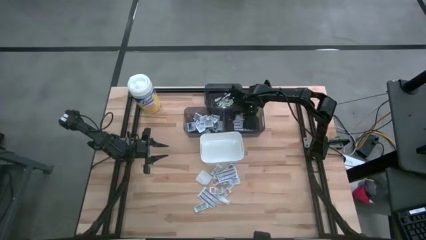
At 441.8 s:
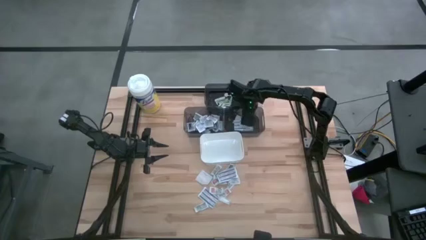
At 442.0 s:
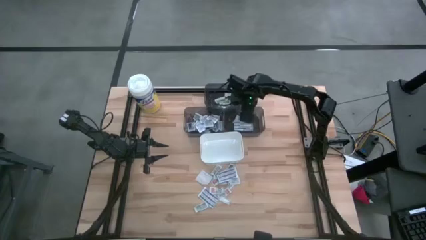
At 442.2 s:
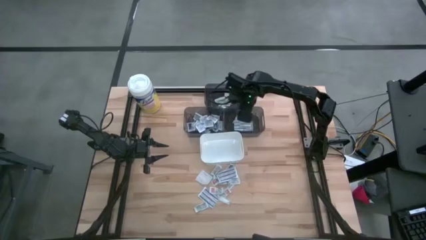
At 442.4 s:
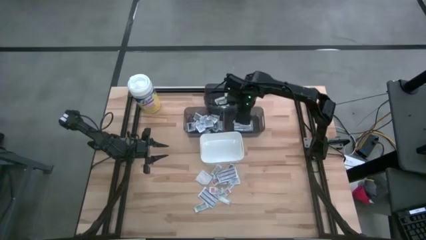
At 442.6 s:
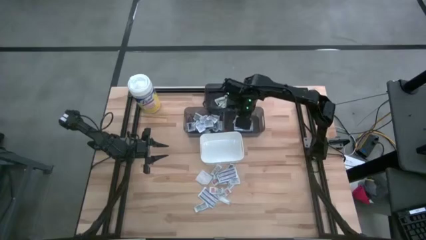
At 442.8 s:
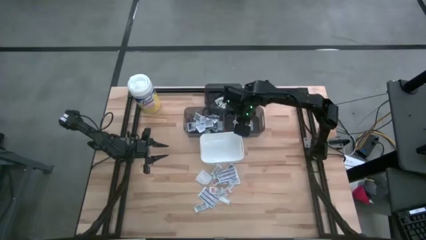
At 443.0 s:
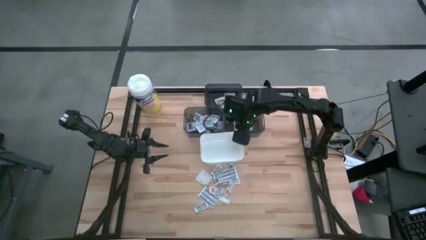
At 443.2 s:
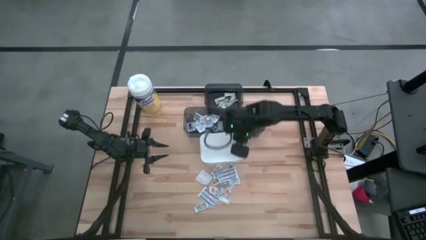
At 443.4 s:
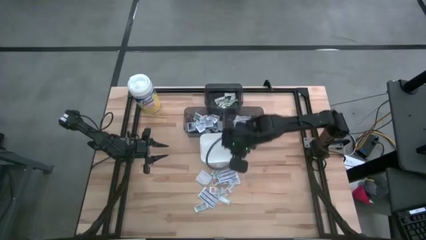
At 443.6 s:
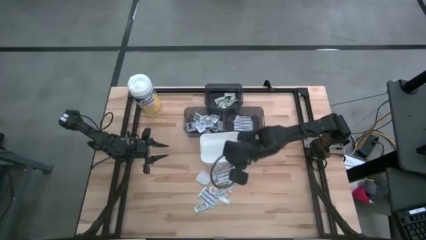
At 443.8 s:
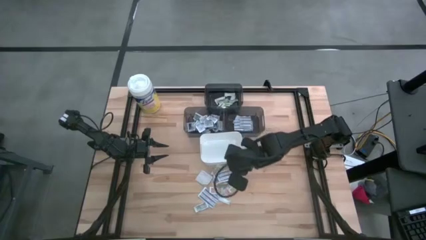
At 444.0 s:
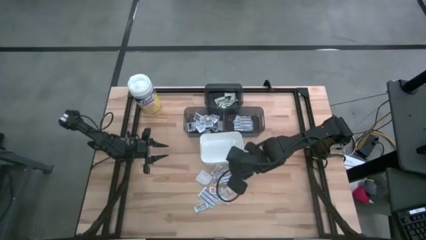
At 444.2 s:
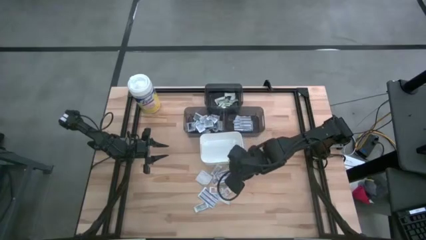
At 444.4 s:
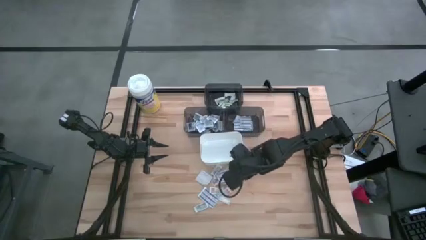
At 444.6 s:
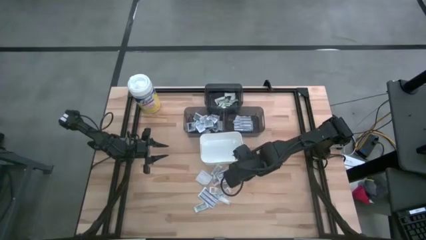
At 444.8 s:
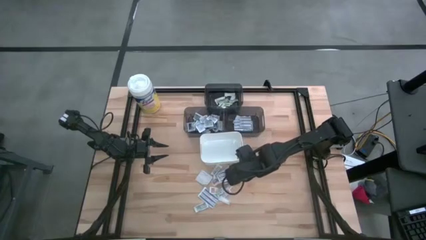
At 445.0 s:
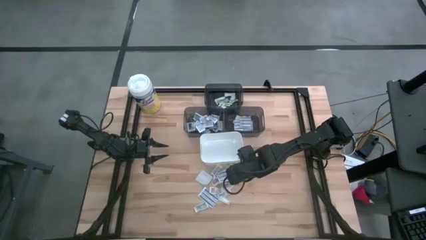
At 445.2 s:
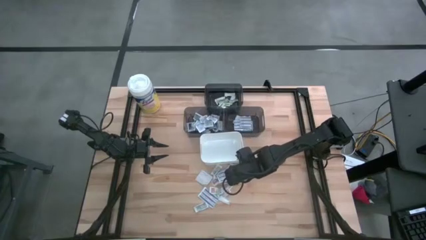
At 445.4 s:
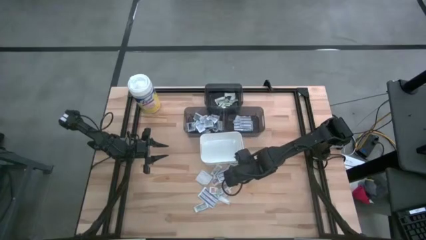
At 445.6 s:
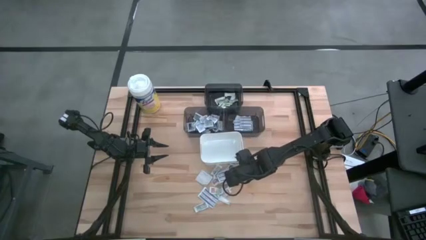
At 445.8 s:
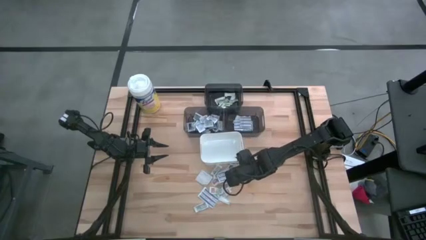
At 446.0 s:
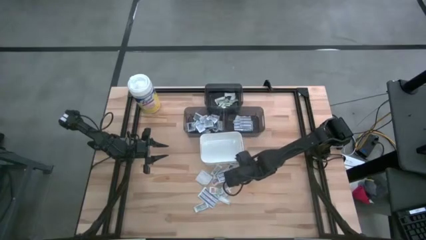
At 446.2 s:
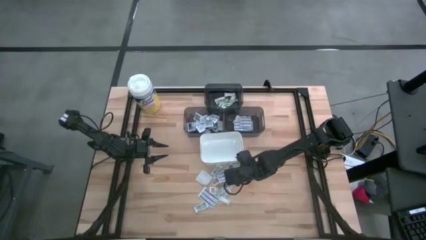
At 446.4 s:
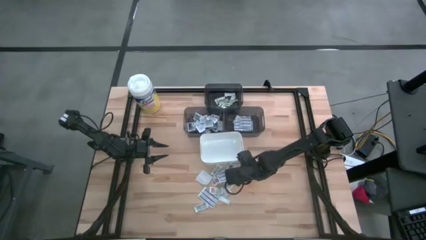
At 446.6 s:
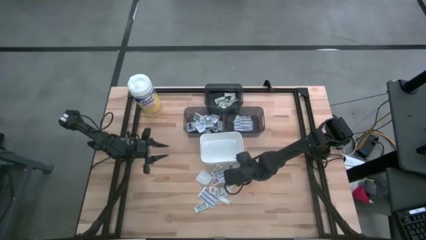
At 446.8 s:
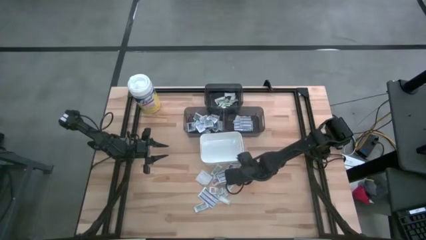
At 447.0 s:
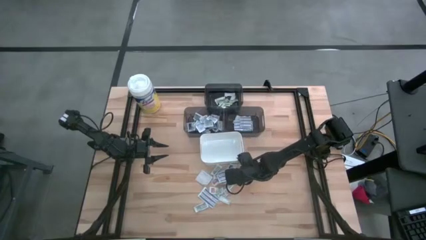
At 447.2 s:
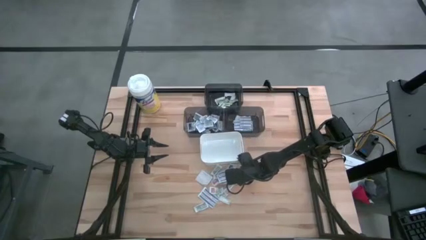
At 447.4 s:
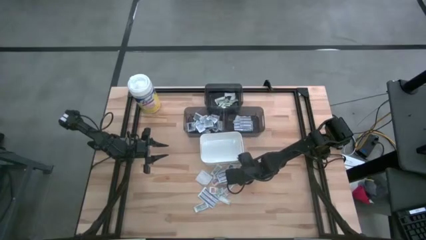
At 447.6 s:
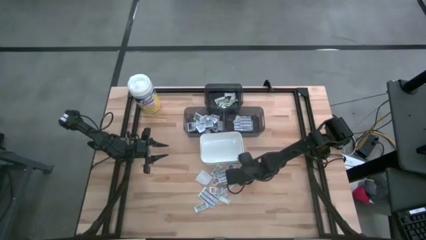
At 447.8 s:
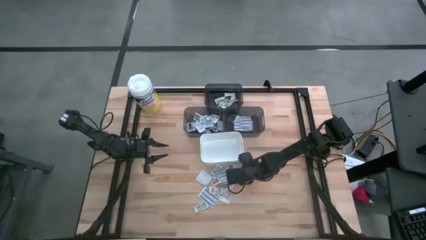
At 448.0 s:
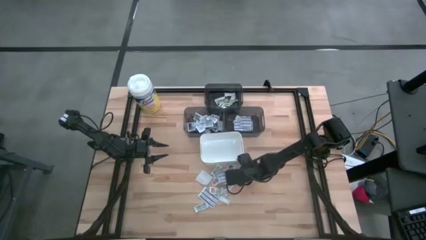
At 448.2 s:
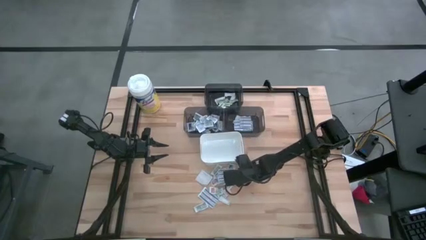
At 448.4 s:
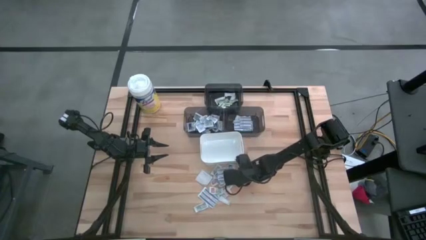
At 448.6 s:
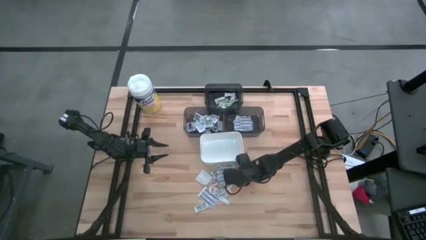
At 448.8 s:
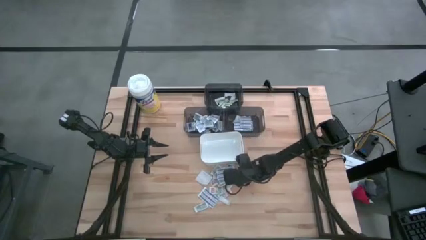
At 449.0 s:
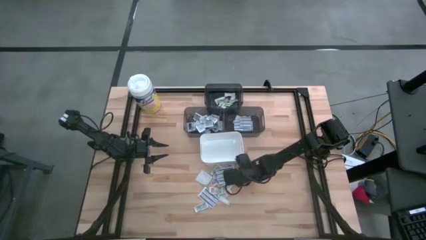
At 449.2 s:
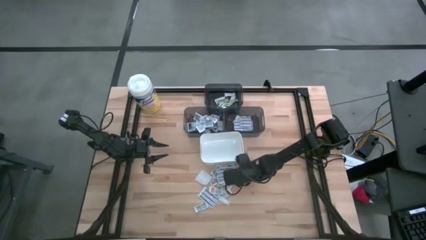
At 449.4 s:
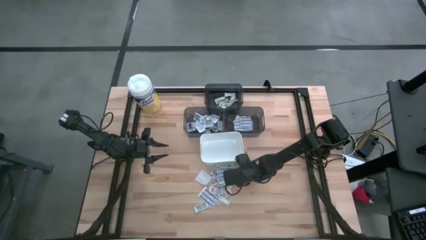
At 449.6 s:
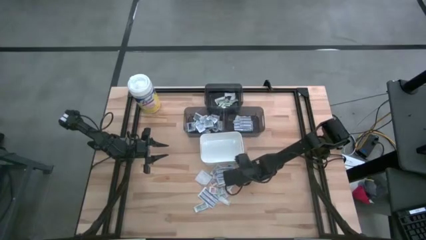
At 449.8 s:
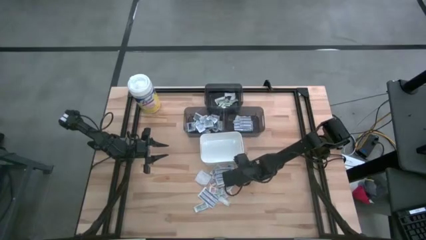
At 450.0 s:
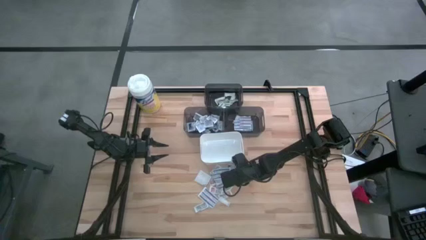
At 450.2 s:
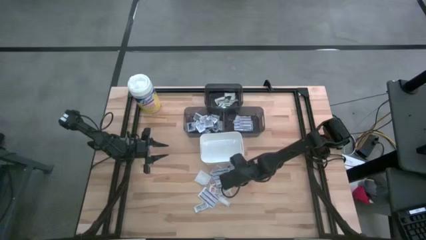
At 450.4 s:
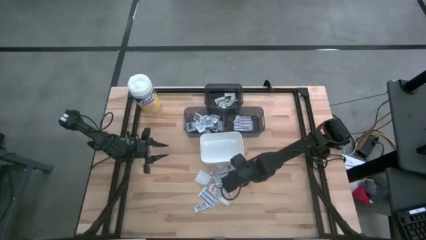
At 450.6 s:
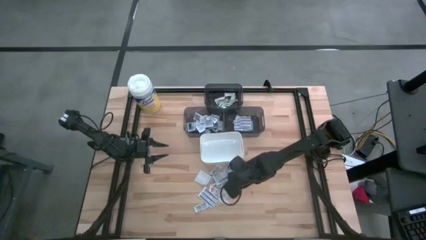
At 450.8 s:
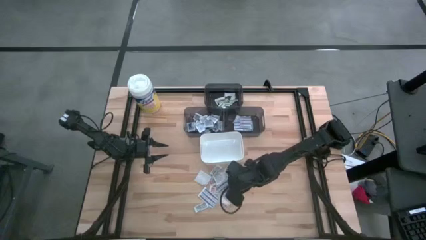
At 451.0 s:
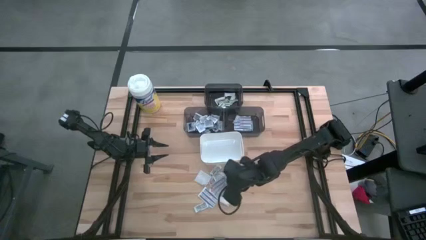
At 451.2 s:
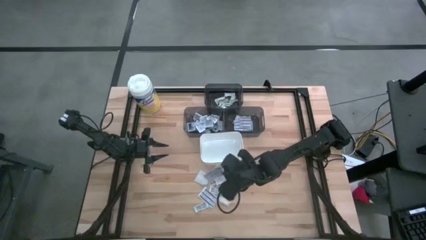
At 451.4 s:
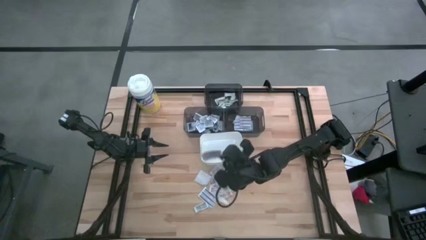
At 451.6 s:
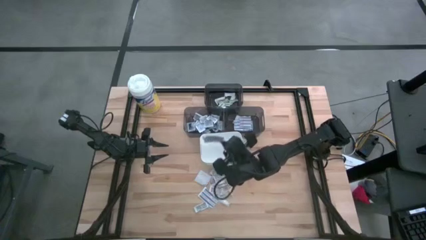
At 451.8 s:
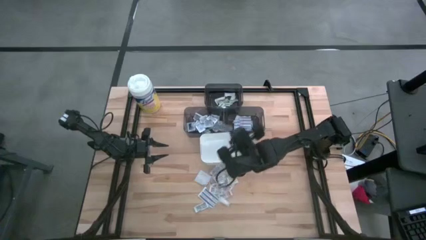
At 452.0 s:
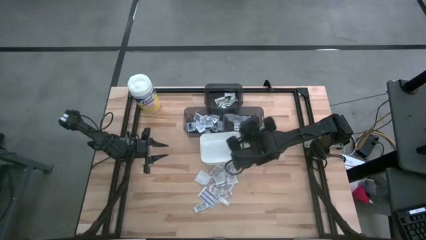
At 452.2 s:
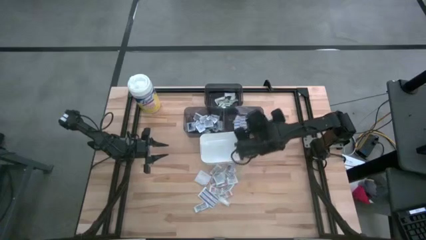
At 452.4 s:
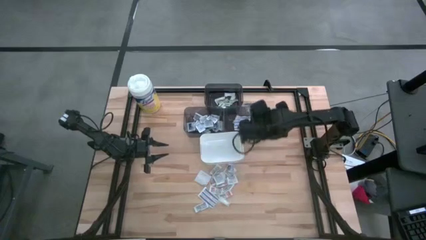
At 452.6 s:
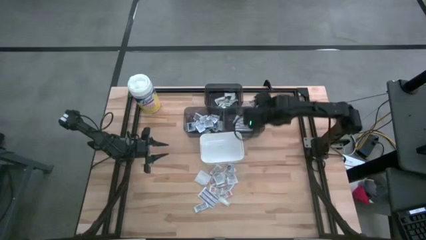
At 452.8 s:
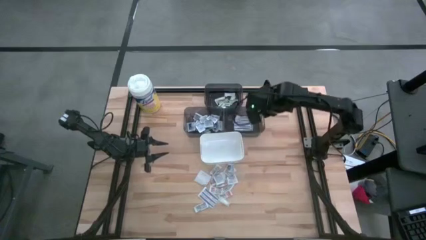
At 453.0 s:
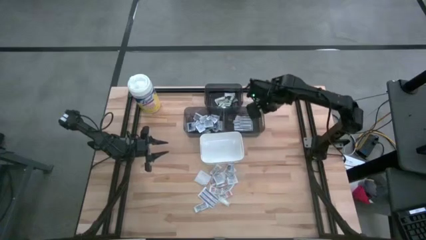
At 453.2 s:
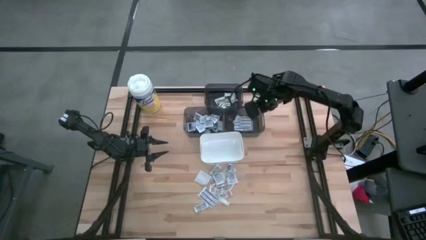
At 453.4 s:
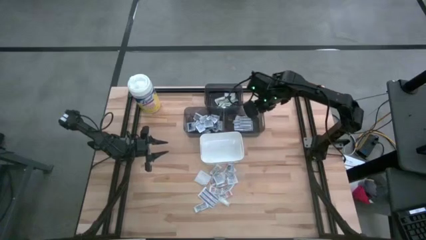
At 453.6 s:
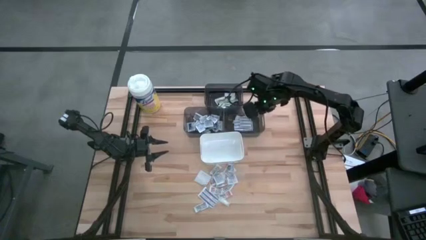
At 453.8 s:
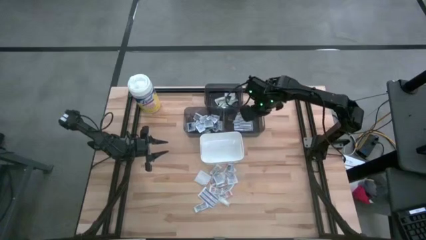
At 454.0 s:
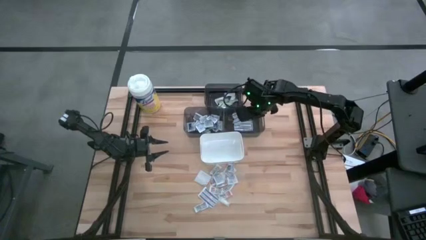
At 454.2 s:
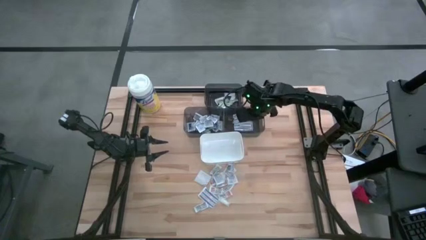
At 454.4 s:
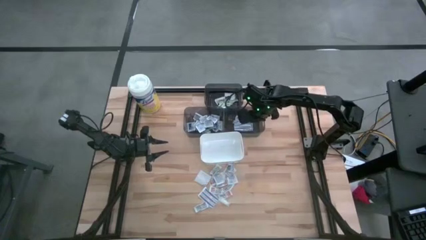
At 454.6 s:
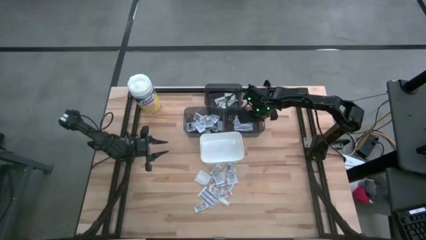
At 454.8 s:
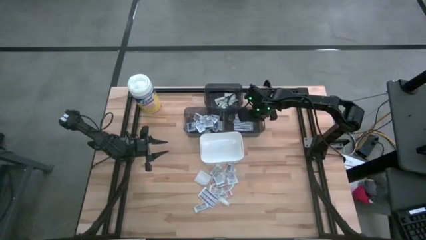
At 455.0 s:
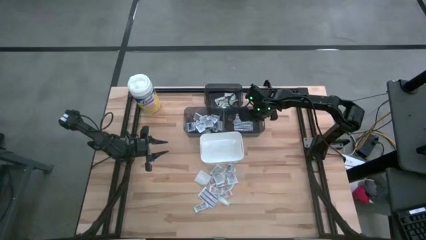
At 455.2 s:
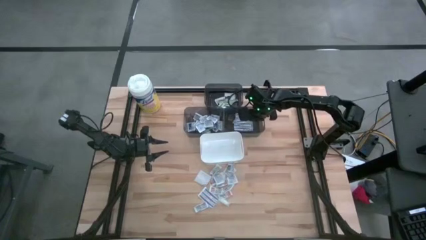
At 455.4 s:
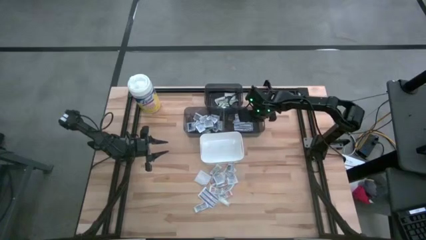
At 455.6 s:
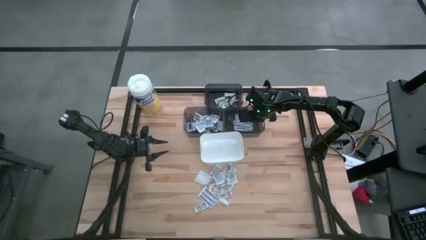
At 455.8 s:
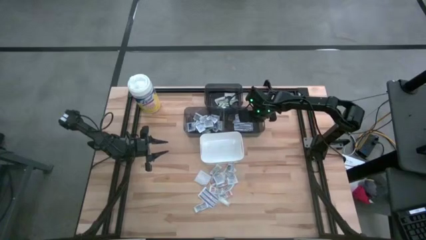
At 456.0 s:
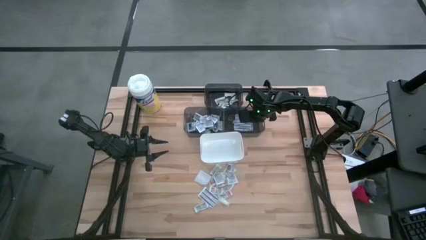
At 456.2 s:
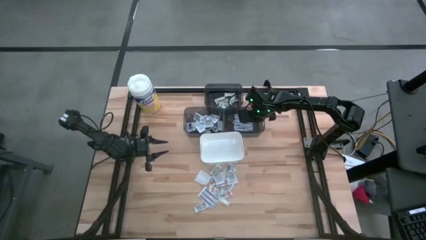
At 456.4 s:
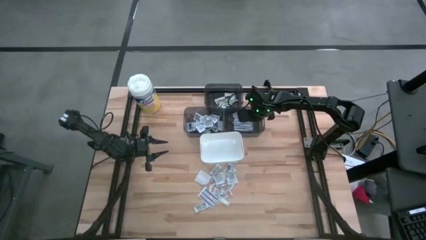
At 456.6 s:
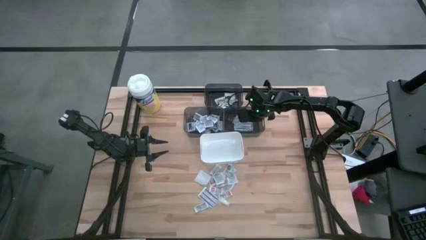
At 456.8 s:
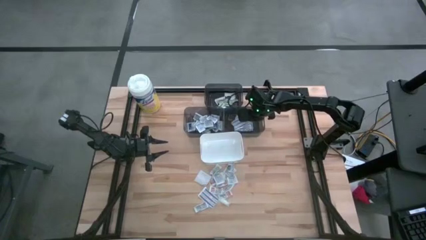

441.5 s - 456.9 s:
Task: Pick & Place First Aid Supplies
Put the blue bandage into the right black bin

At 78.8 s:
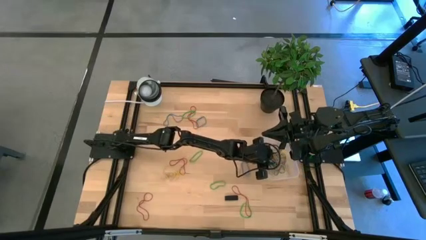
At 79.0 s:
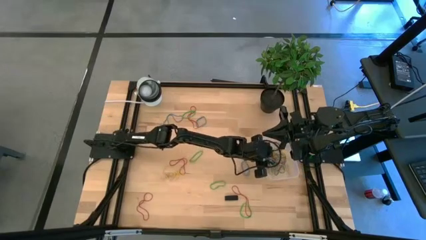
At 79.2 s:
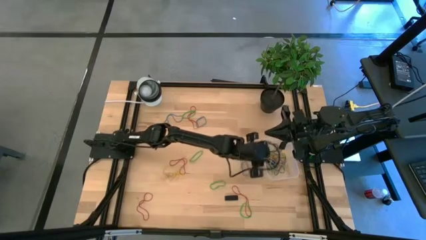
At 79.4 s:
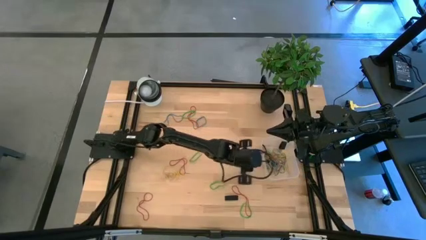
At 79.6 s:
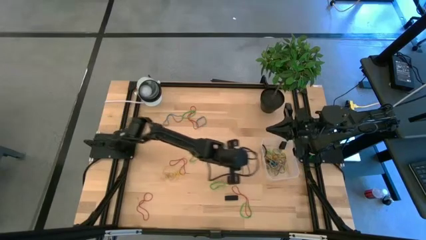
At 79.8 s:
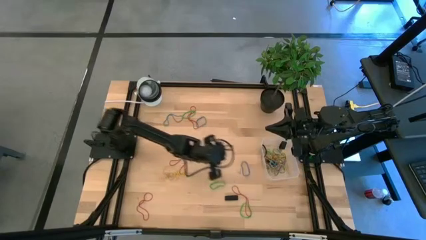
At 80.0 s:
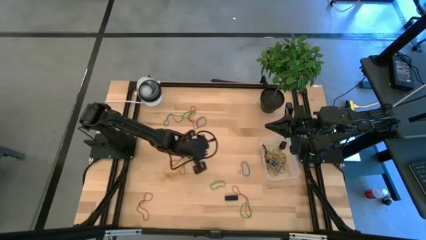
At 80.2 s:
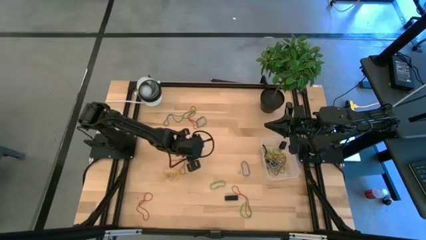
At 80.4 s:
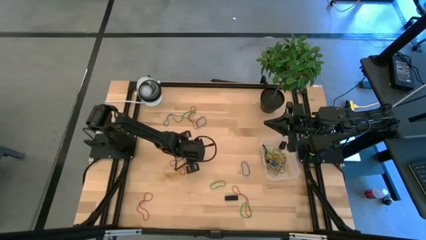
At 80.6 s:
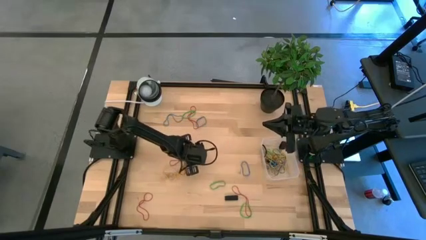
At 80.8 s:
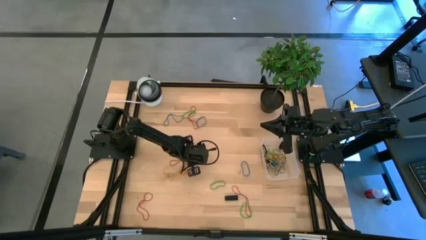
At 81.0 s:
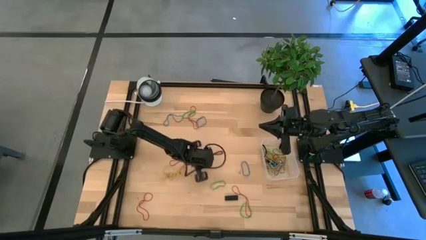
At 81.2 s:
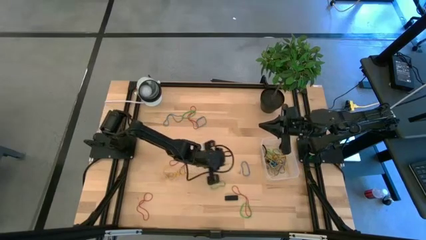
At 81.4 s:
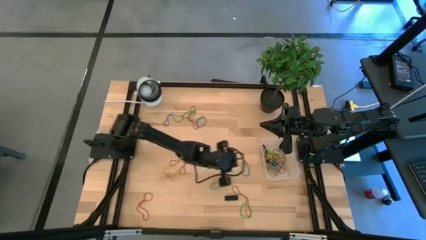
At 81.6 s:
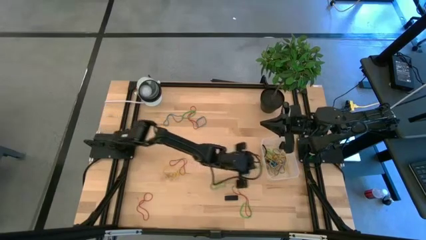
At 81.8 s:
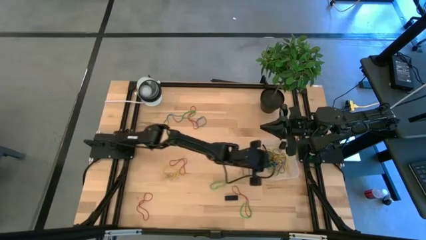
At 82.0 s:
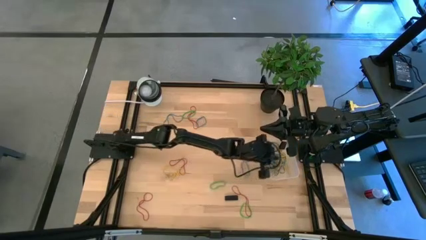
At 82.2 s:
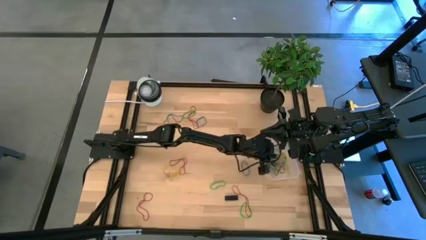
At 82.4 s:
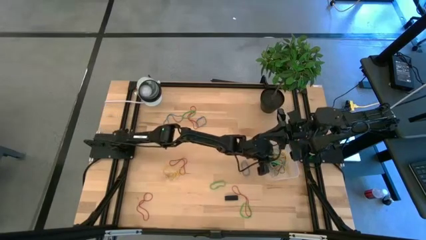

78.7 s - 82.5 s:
Task: Pick and place rubber bands into bin
Put the green rubber band into the transparent bin
